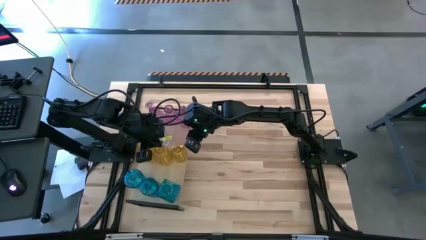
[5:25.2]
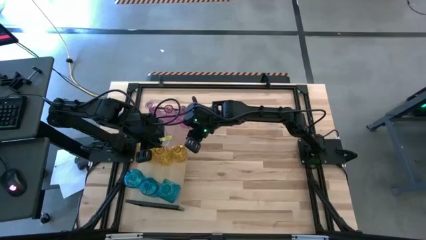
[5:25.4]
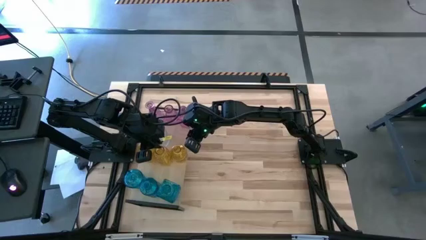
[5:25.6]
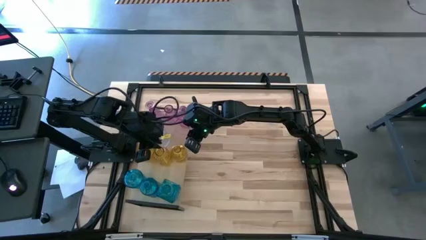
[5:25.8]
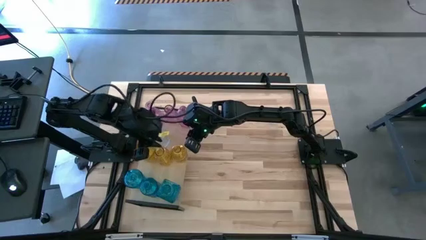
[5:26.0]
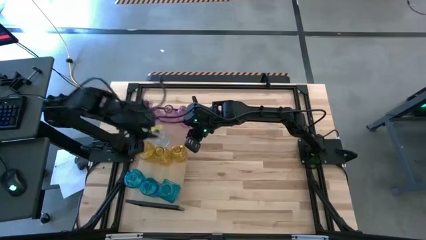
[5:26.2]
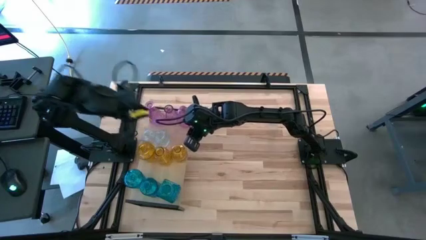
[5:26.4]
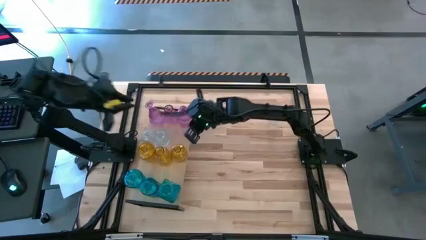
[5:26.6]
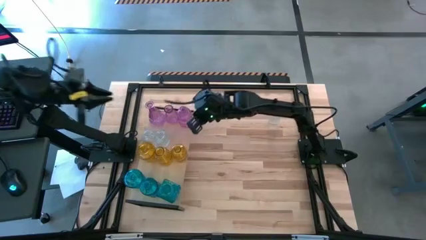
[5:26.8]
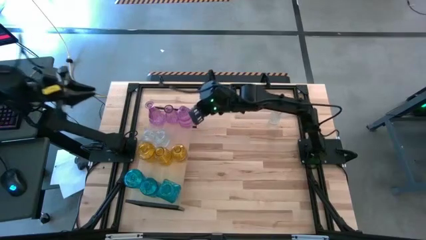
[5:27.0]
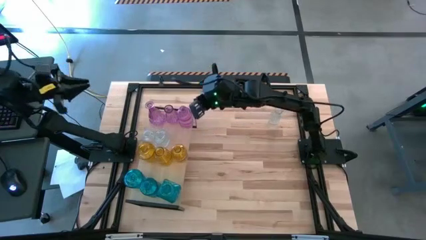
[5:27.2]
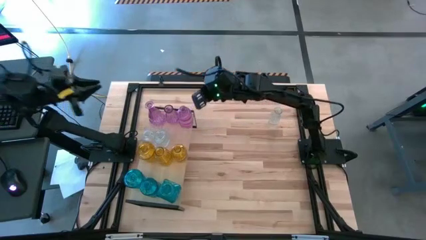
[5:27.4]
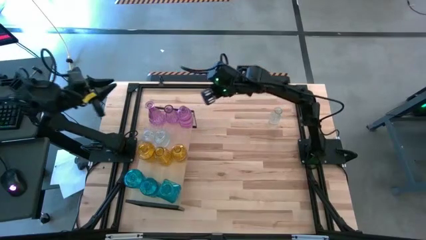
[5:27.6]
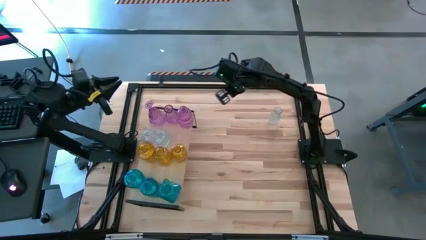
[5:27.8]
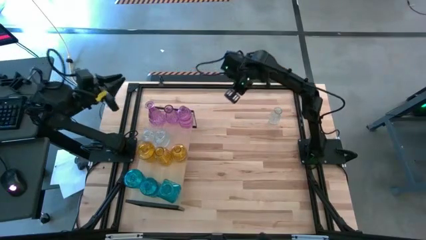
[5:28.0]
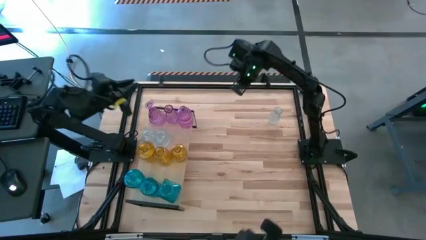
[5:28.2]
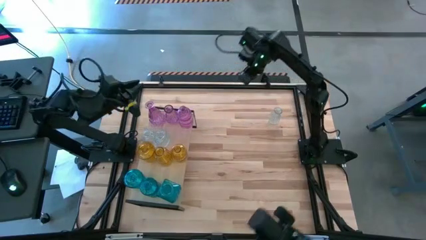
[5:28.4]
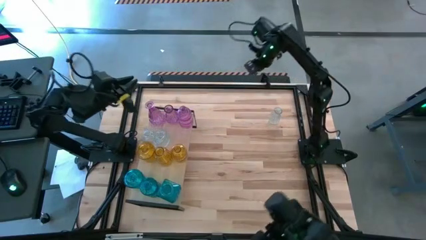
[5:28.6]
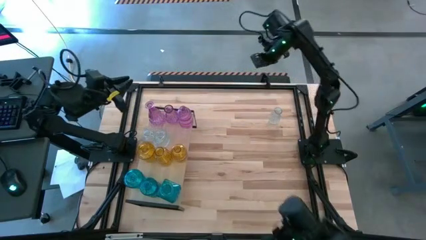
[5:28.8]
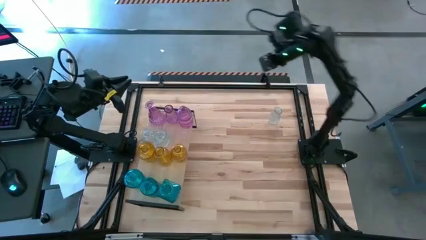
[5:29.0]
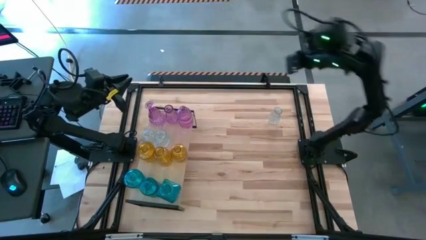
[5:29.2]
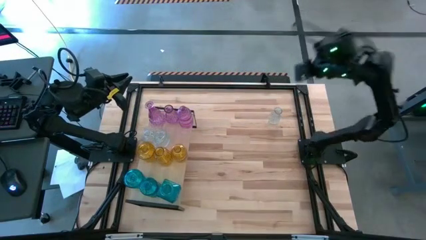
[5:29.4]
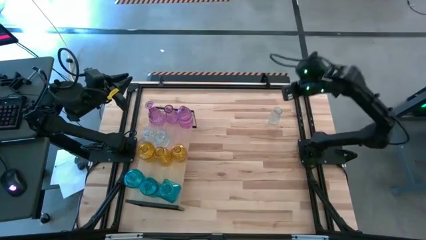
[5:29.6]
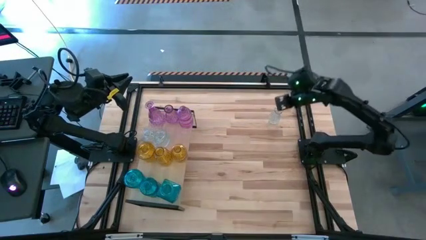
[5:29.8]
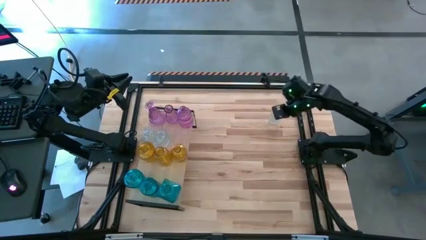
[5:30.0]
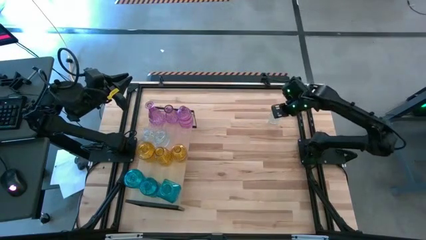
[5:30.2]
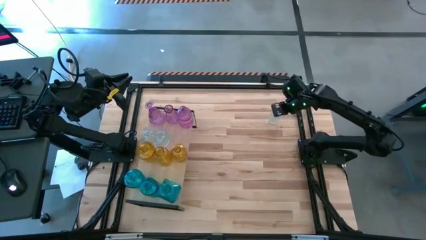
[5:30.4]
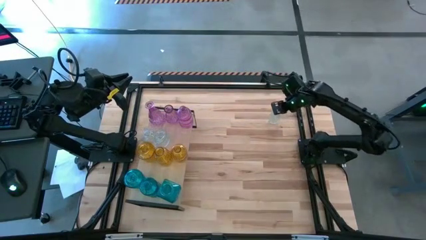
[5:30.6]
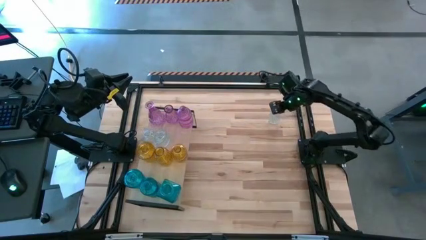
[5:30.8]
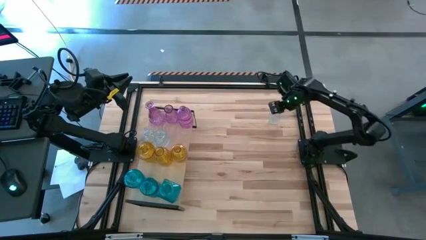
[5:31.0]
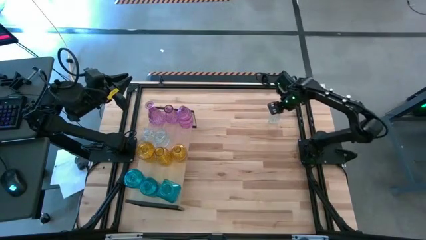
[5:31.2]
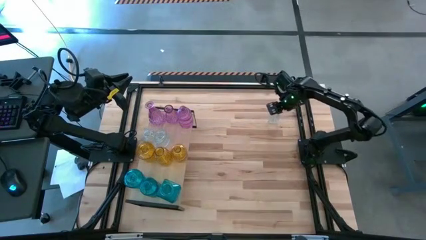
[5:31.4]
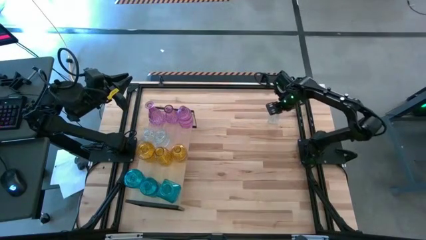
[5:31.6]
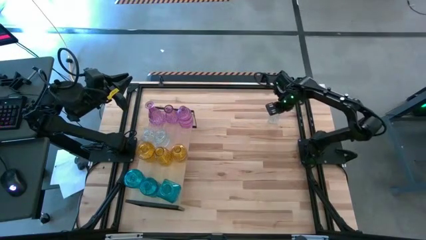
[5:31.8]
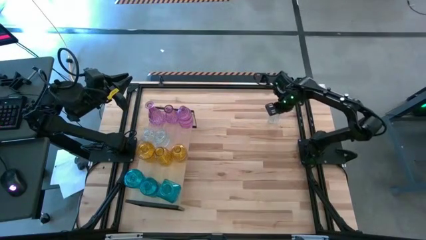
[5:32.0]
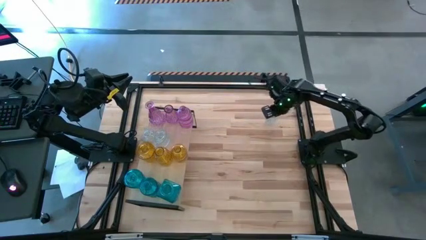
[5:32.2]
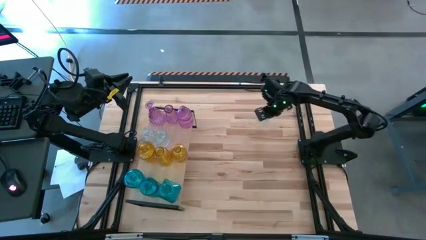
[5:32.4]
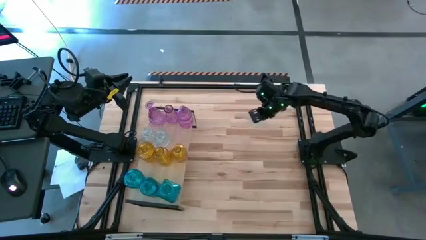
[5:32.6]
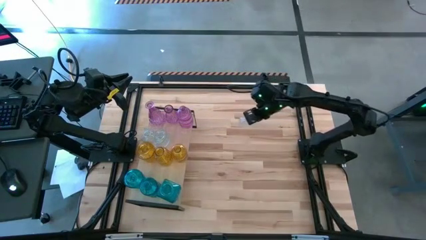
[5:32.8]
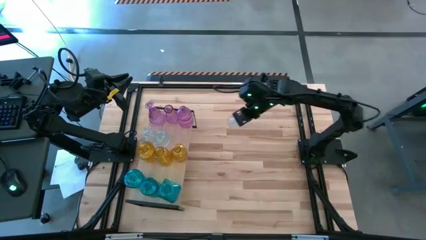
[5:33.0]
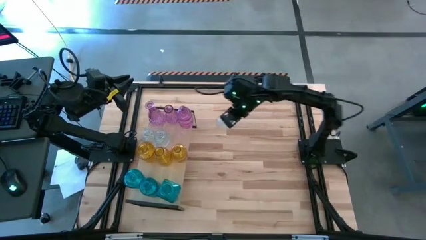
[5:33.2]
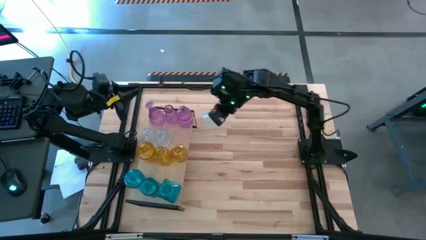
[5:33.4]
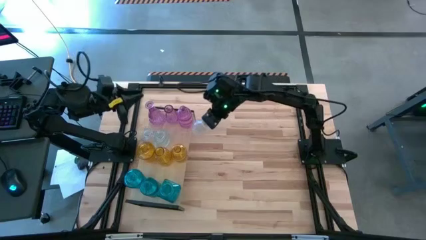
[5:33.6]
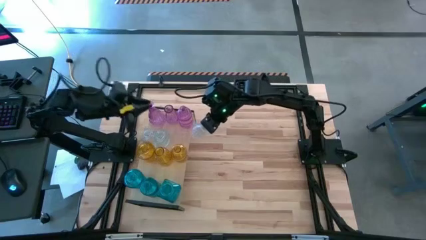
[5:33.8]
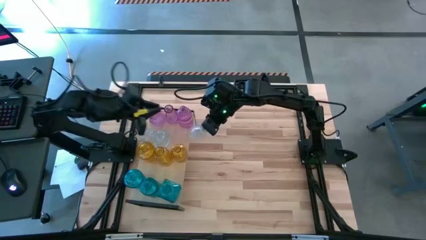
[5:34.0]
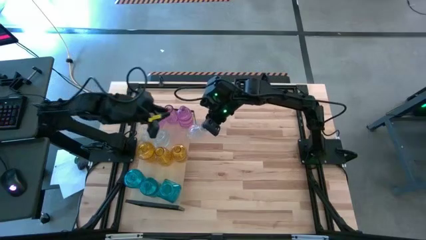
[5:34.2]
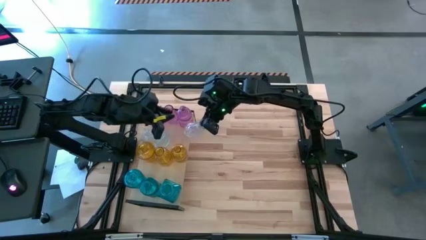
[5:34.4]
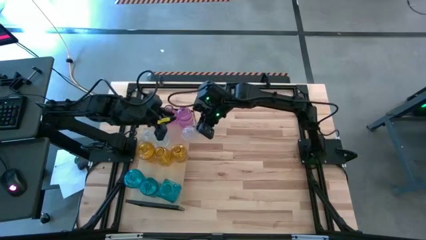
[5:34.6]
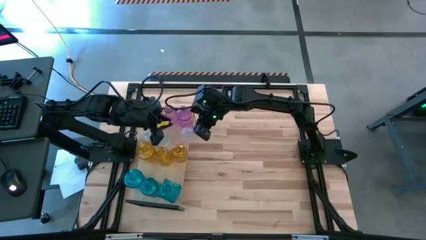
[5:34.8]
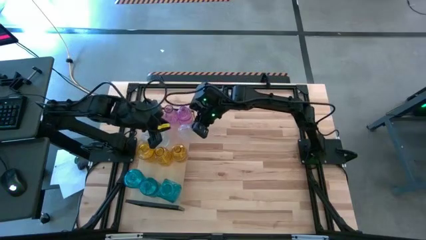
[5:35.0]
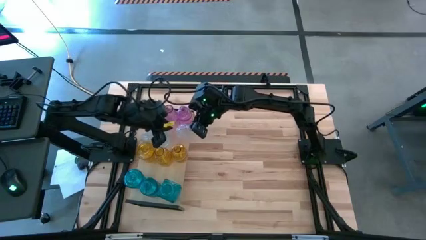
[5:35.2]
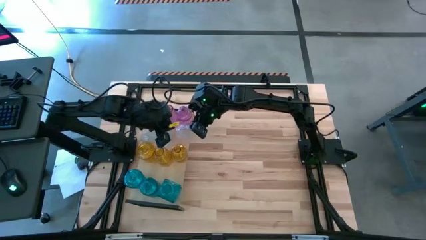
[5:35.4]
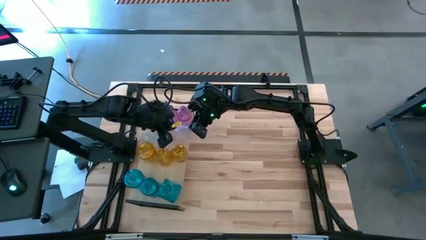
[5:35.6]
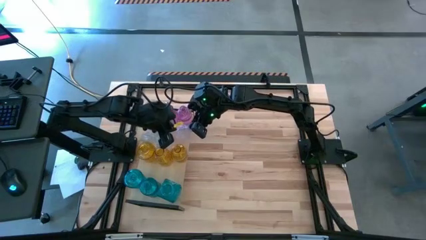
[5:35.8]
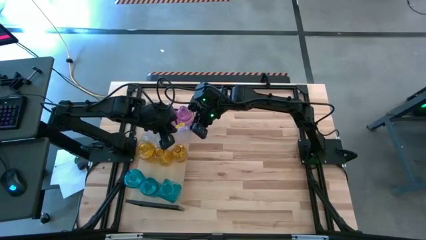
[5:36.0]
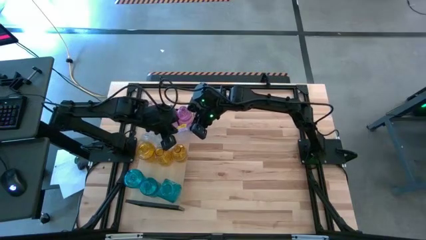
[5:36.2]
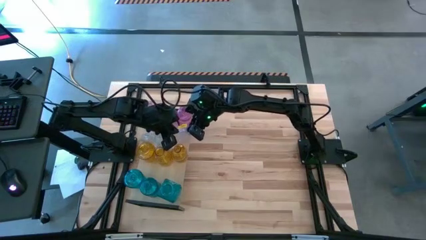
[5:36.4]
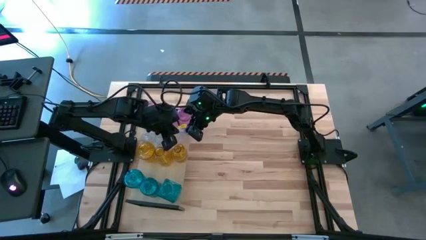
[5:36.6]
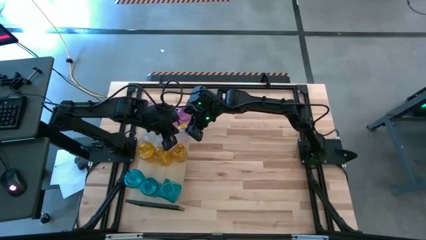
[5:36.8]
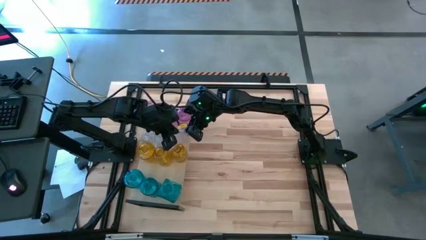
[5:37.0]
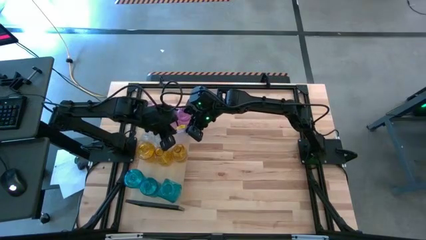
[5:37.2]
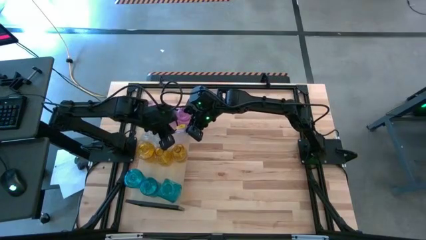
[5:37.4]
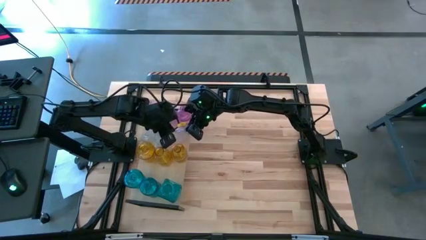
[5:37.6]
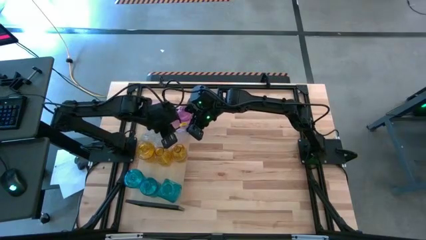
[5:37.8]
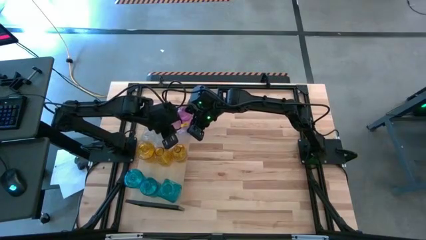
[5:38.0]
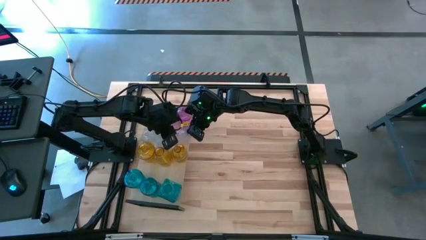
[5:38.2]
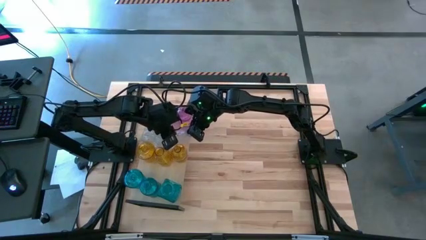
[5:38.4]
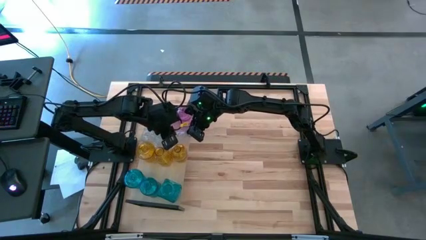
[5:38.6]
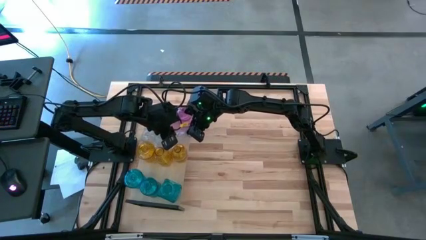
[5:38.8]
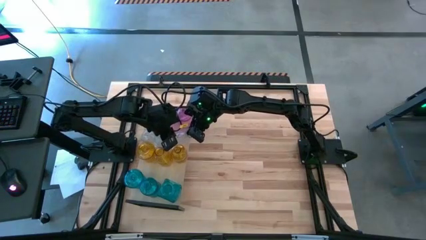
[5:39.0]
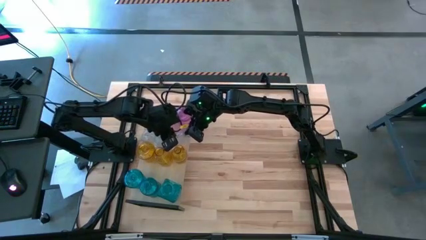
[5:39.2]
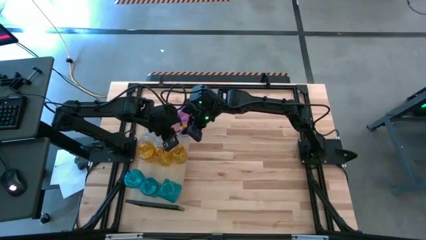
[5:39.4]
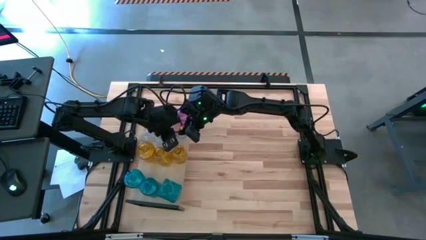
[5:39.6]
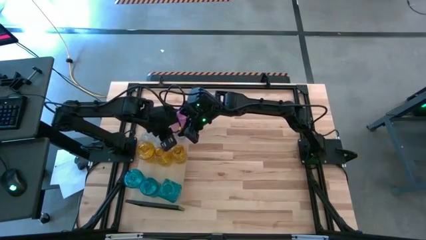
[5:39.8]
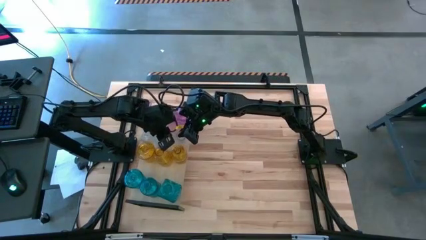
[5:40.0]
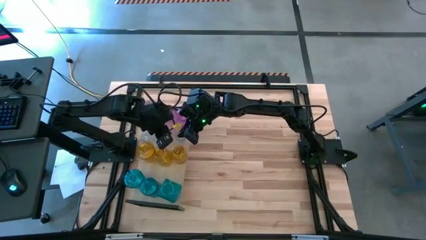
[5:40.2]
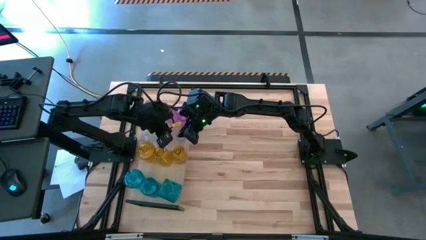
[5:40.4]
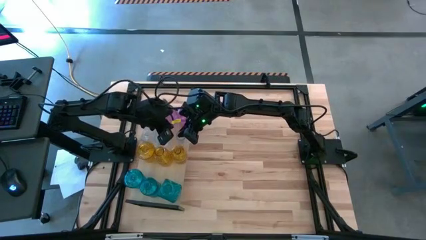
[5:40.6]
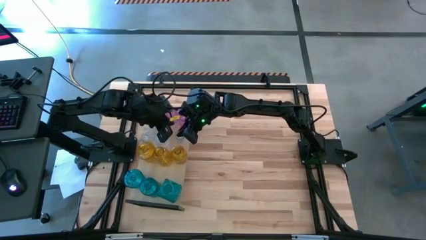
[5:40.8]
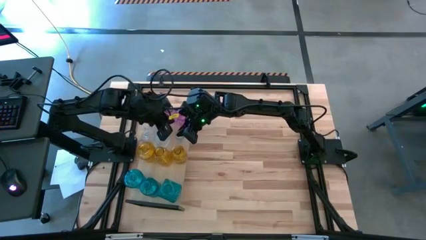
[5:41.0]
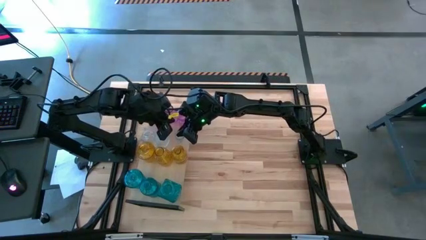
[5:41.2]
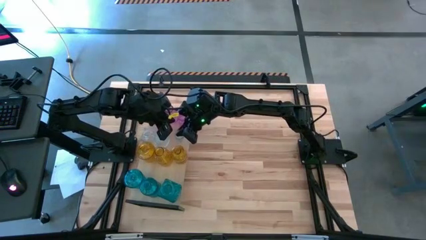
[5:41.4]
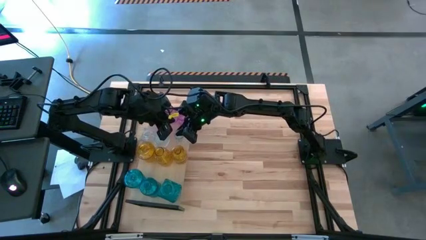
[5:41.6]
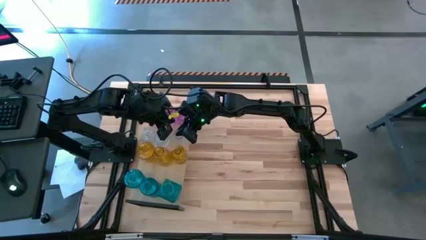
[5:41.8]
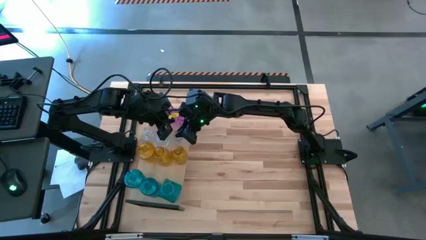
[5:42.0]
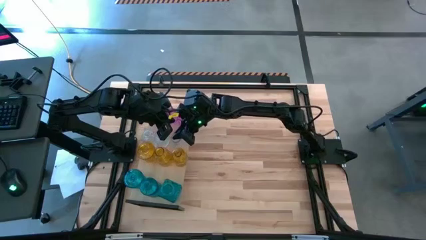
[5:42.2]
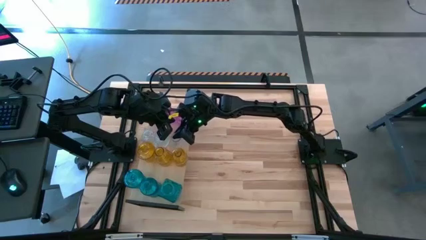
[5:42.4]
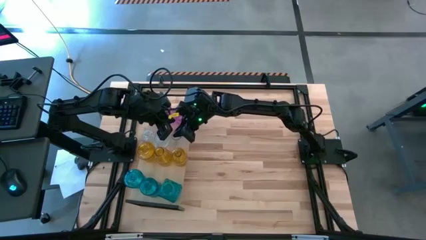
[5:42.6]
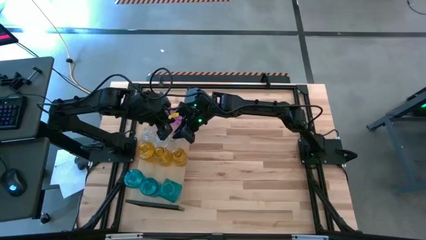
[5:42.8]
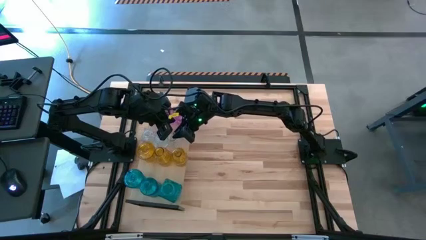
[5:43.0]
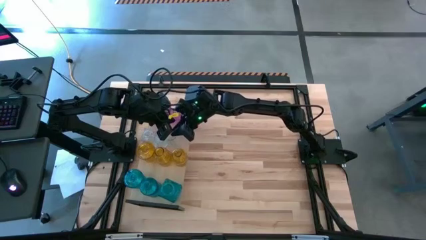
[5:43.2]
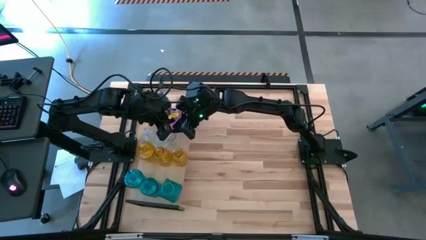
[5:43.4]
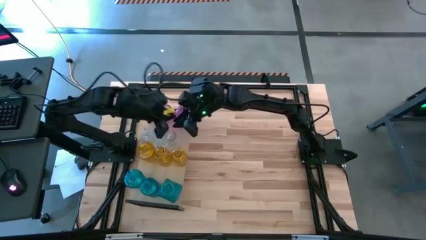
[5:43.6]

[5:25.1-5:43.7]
Task: sort vases onto shelf
Put the transparent flower vase on the shelf
